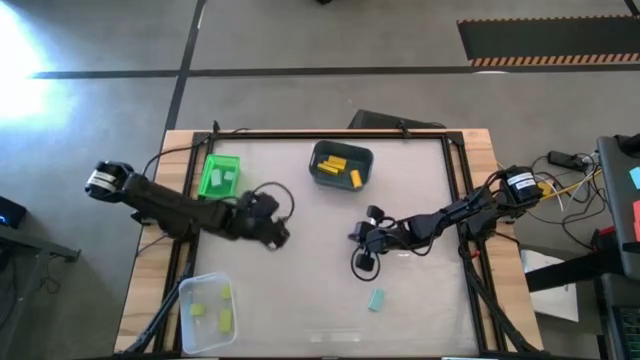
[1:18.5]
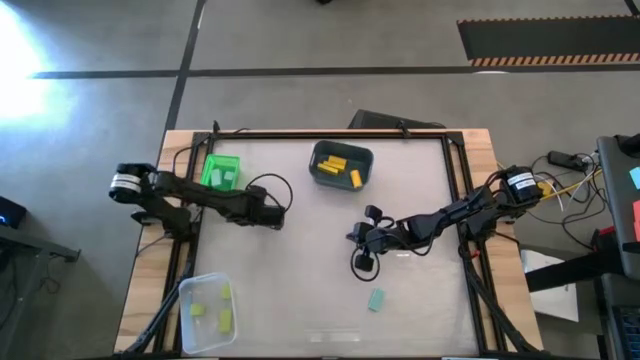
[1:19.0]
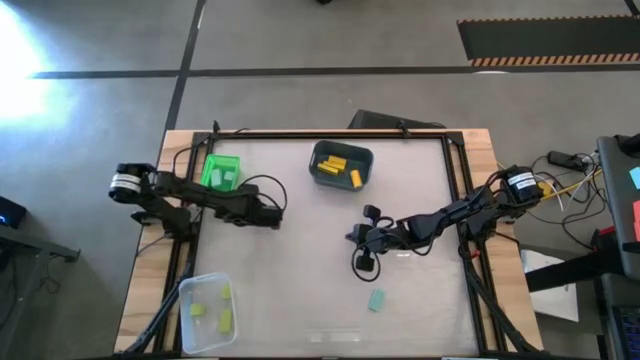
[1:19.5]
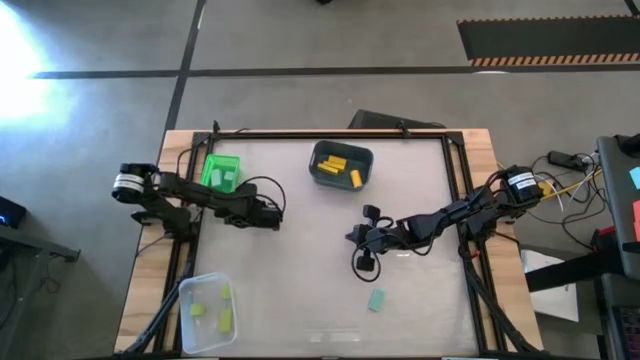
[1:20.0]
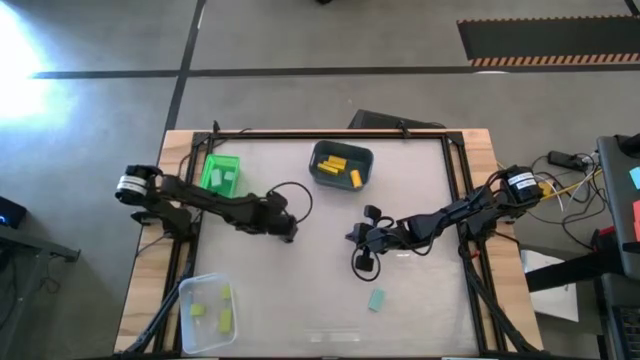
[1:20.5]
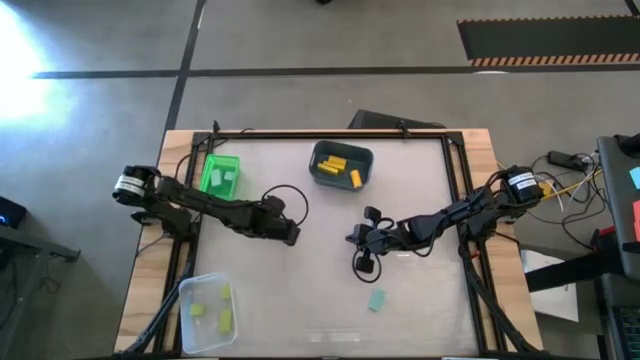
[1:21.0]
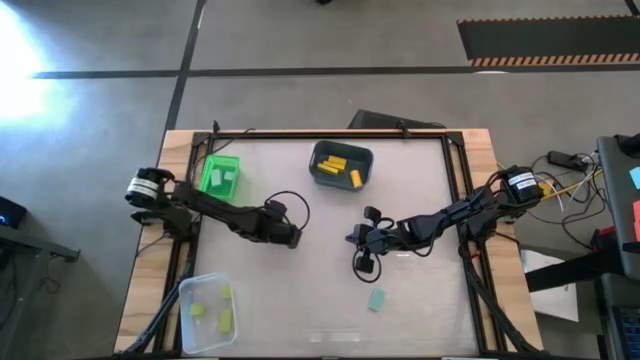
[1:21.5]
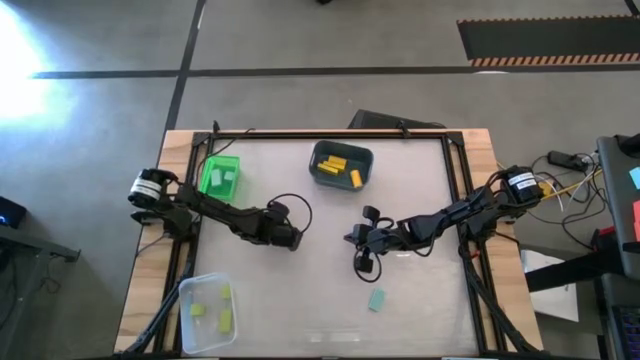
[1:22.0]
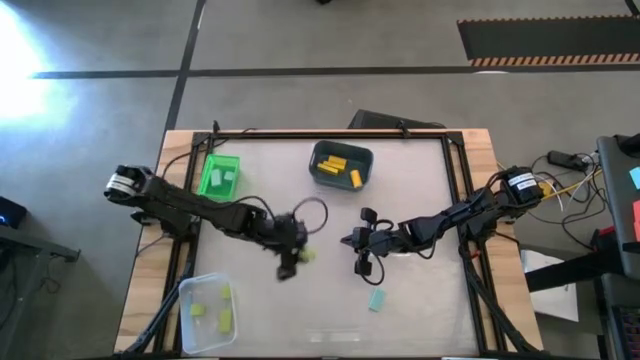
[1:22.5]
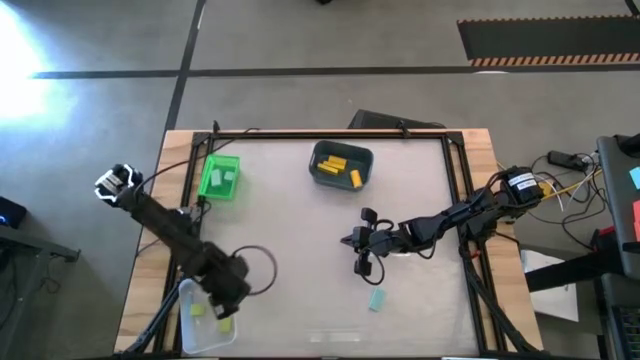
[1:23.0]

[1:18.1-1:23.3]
Task: Sort & place blocks by color
Put the green block into the transparent bin

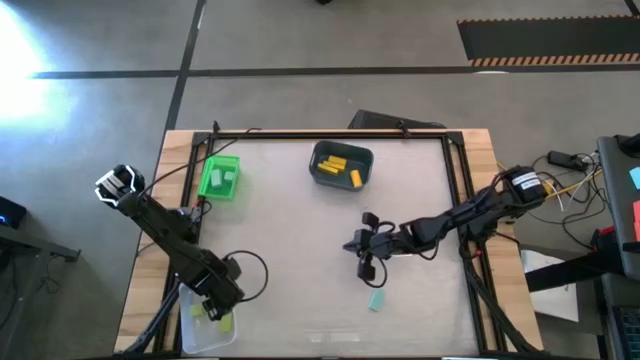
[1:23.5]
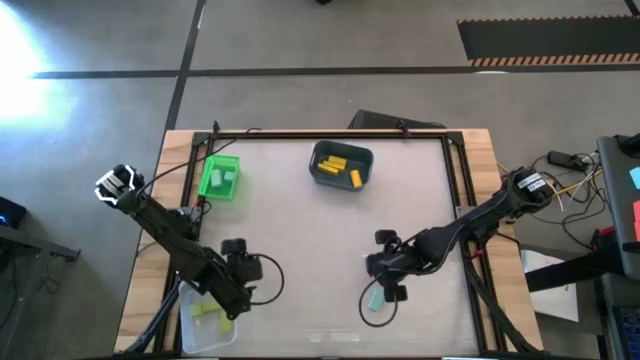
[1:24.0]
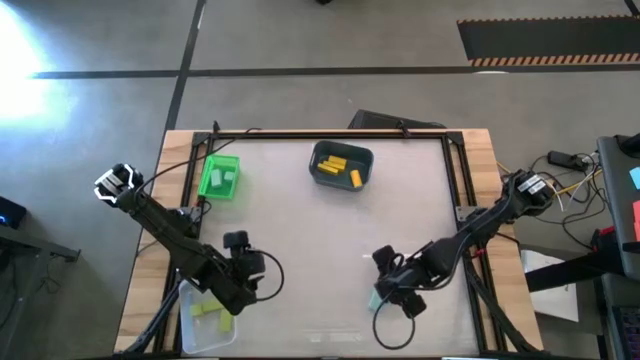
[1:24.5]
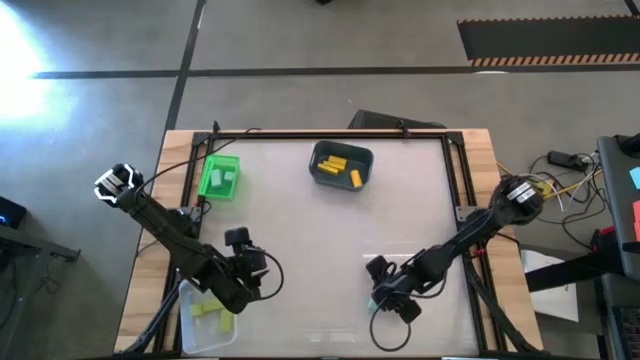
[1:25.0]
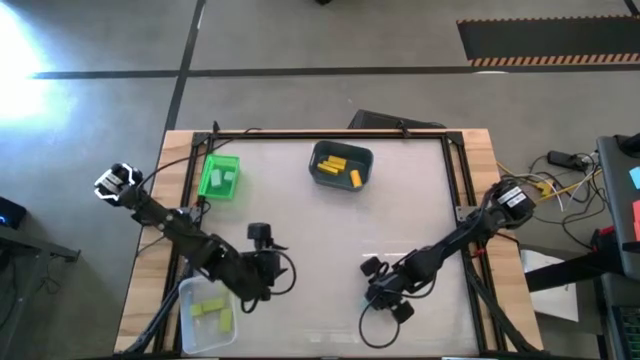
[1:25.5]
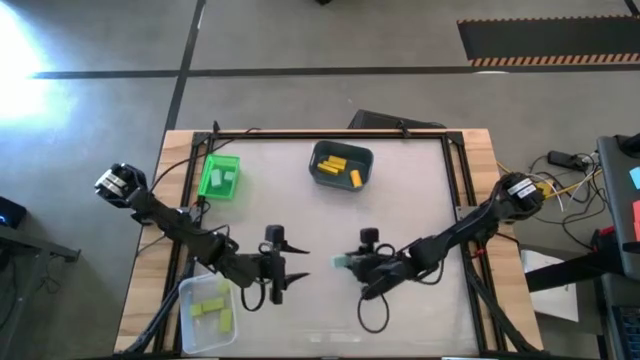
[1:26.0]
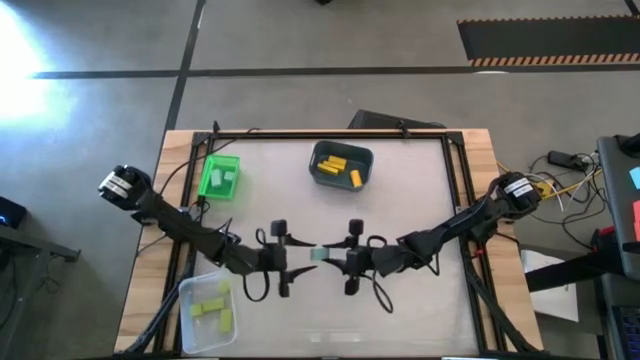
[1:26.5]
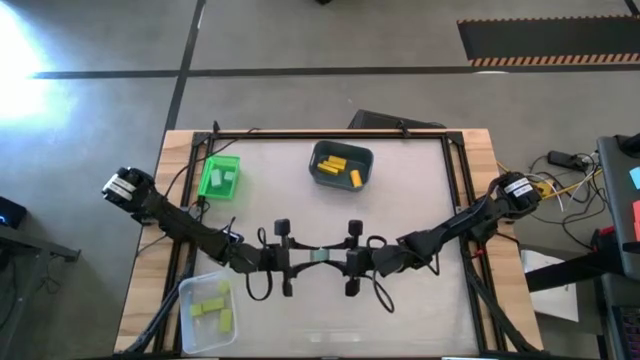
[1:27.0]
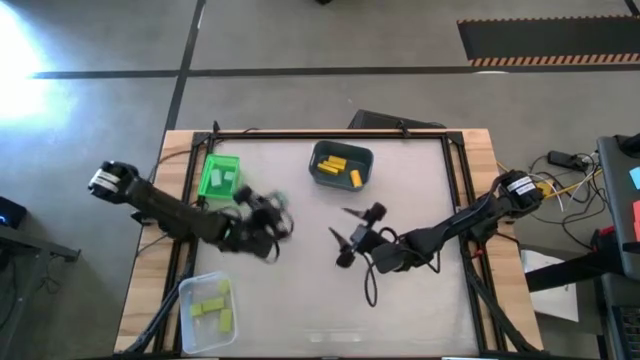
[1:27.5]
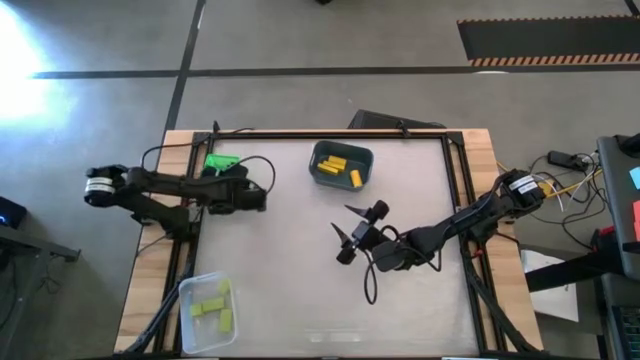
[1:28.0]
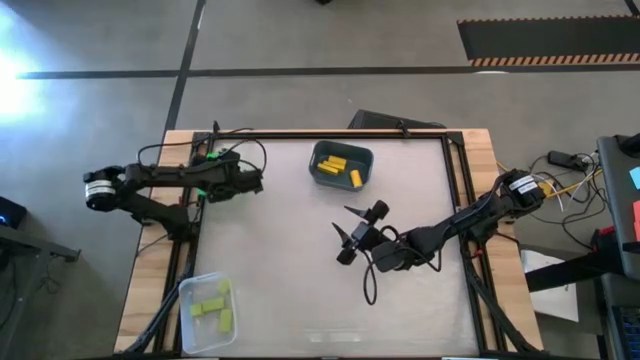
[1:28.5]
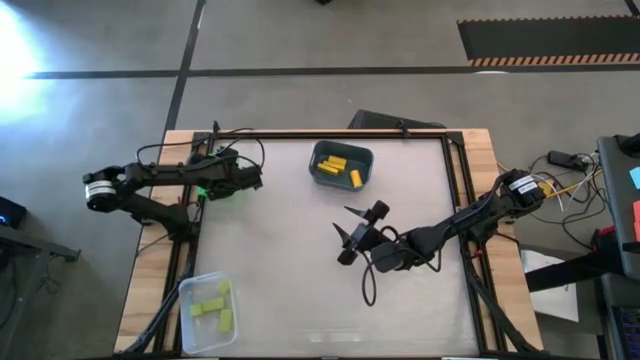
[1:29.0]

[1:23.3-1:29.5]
Put the blue block into the green bin

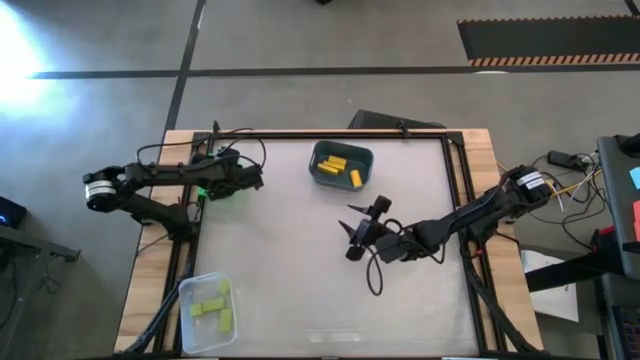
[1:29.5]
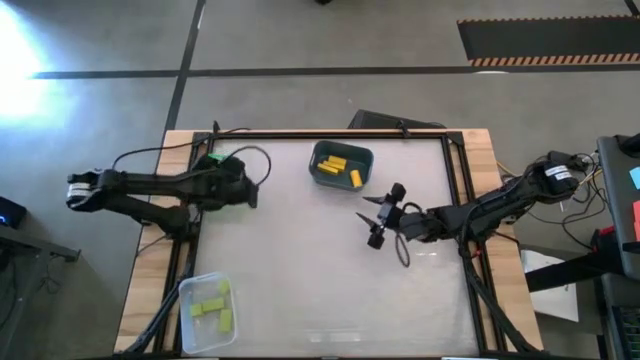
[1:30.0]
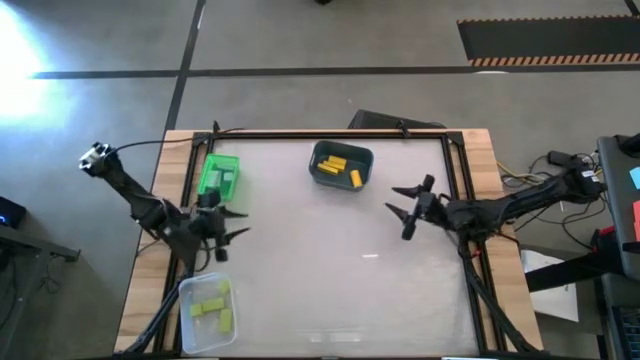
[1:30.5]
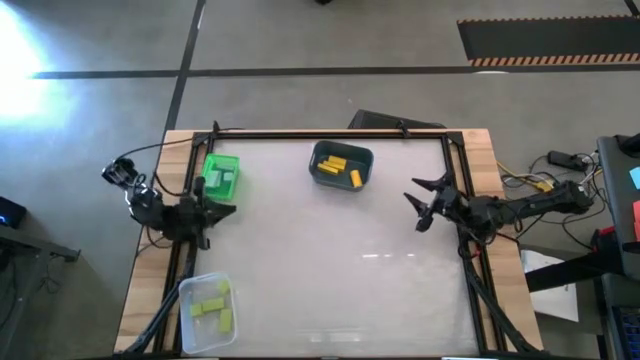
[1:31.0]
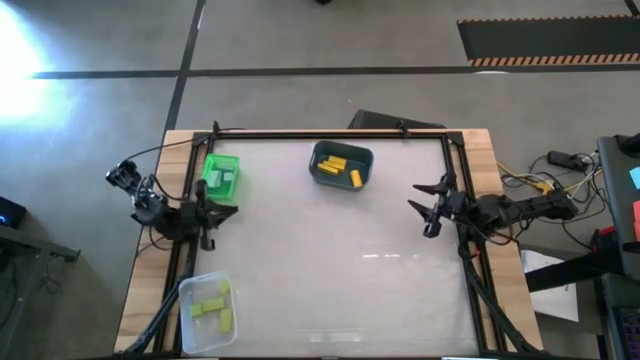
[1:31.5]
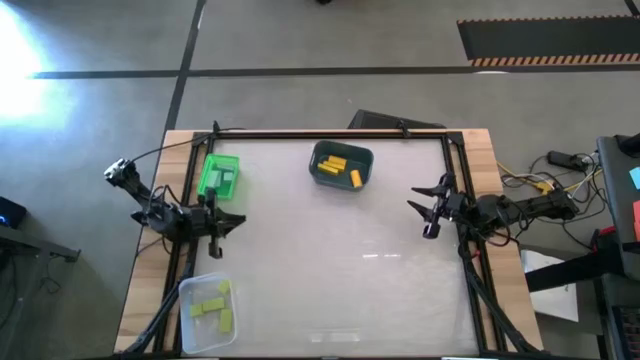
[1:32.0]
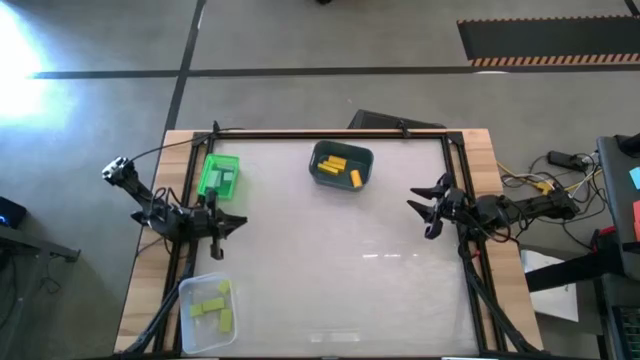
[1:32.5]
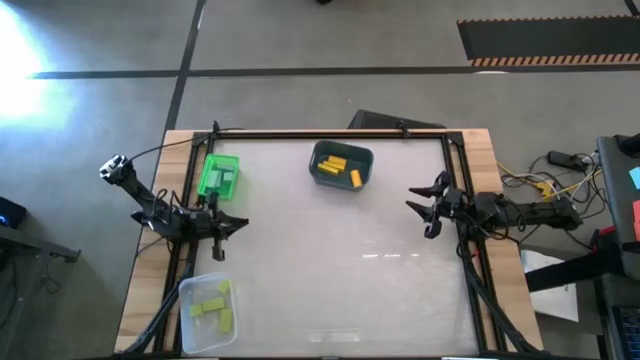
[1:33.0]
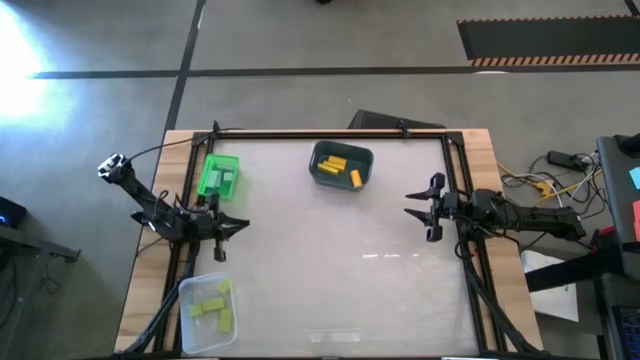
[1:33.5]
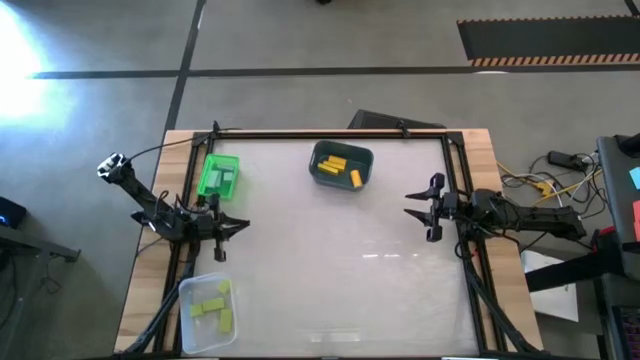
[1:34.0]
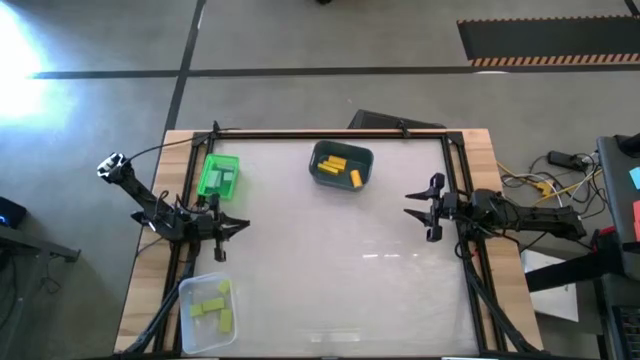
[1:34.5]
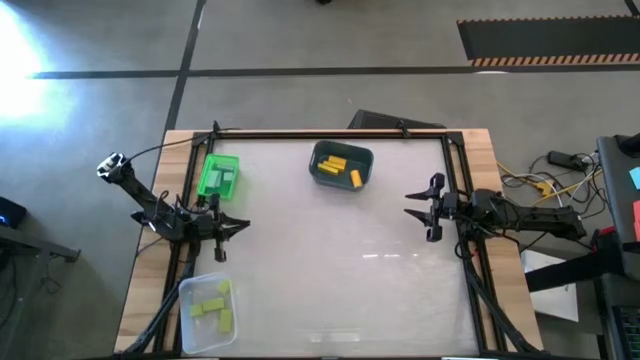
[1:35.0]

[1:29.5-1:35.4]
Return to Home position

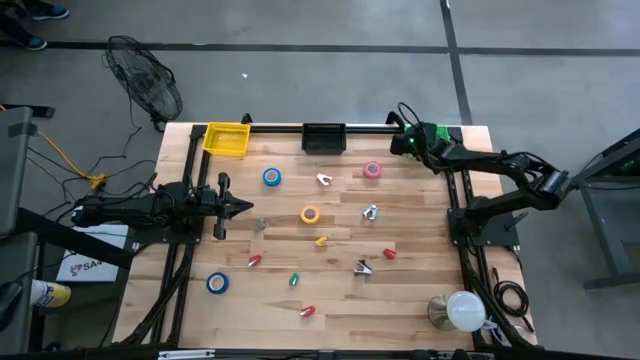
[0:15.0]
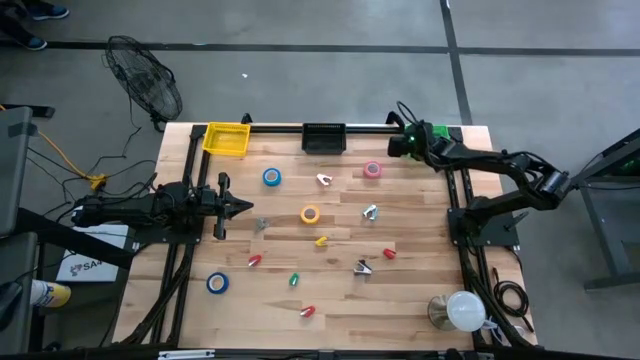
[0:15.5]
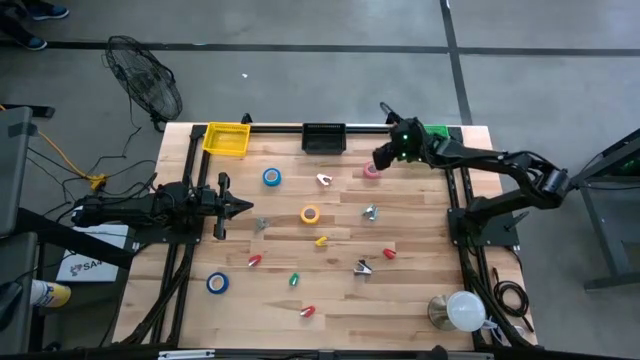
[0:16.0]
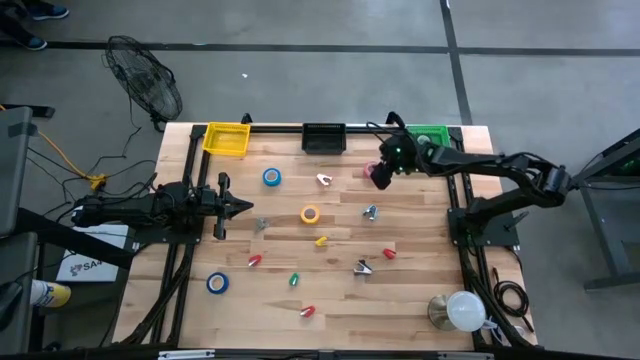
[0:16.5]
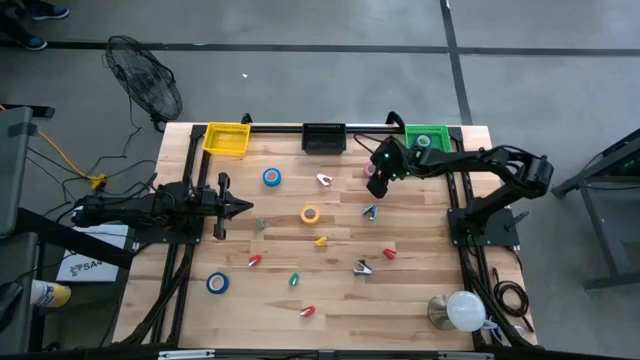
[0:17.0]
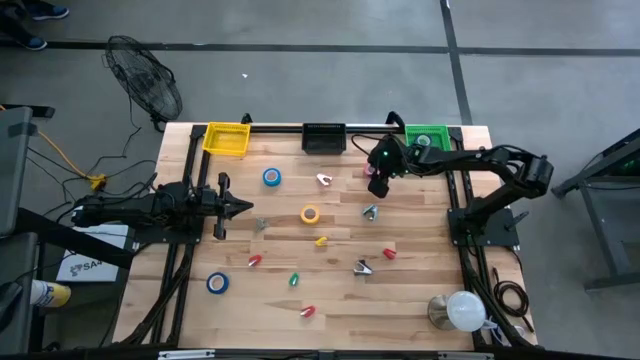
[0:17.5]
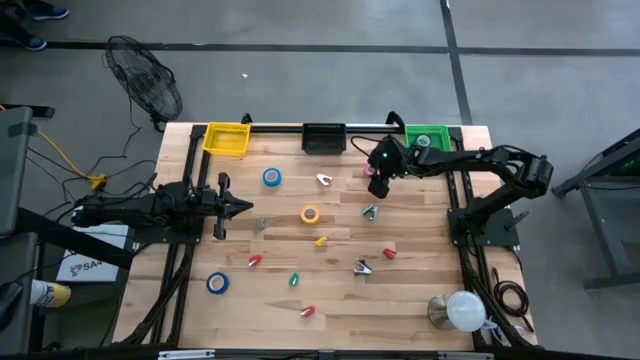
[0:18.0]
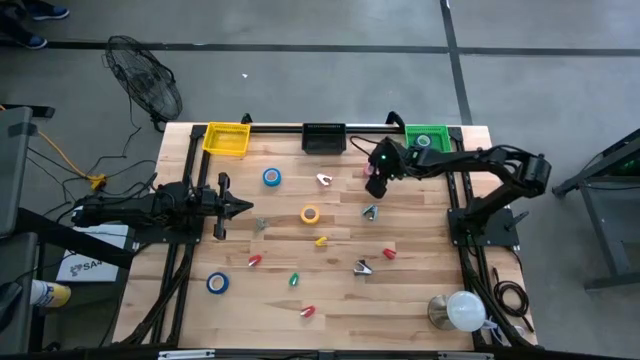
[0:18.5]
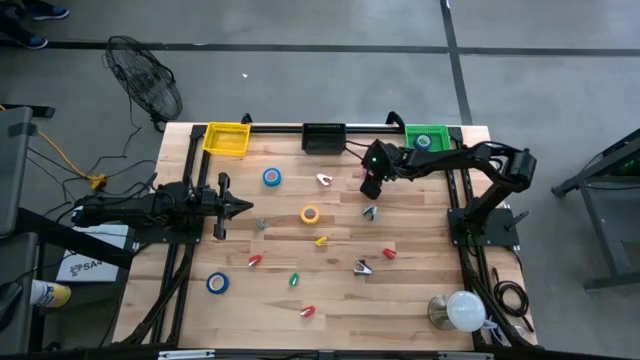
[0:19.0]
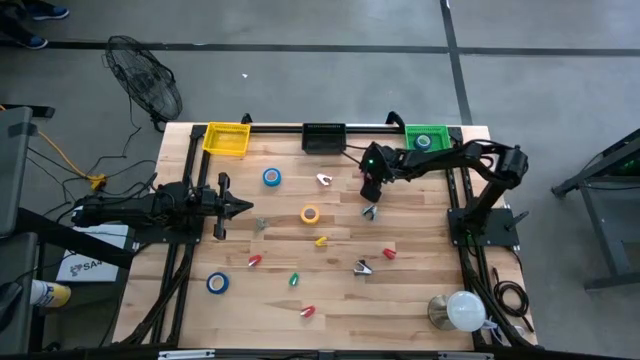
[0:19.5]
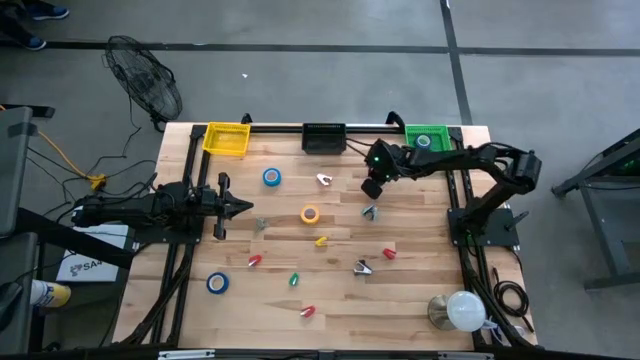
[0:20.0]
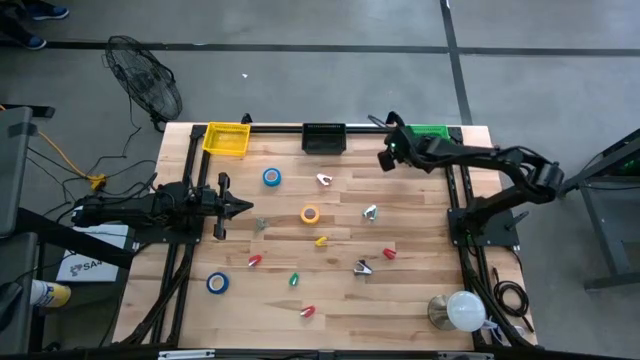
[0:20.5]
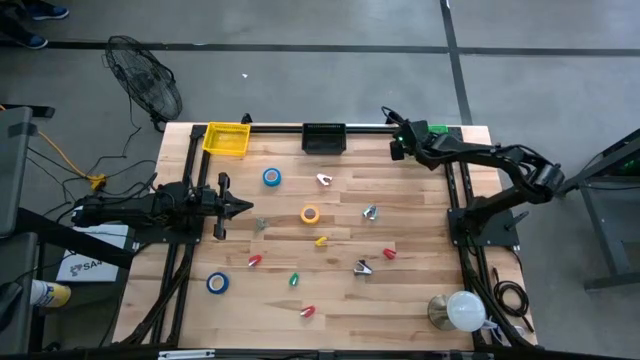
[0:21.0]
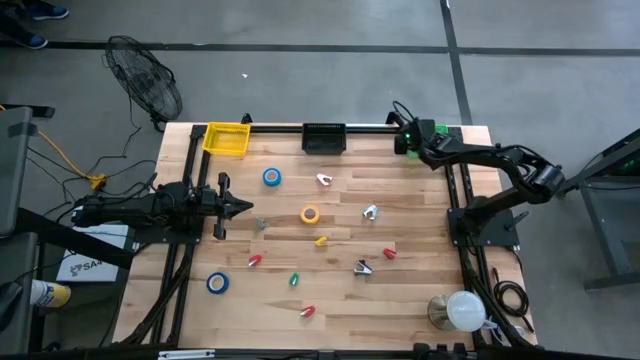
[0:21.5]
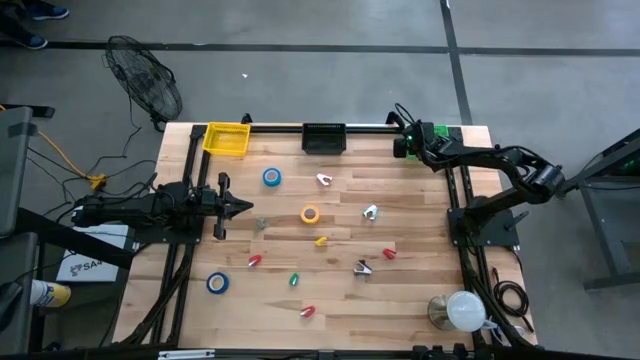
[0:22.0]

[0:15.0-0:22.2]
Task: Pick and place Stapler, Stapler remover, tape
Put the pink tape into the green bin
